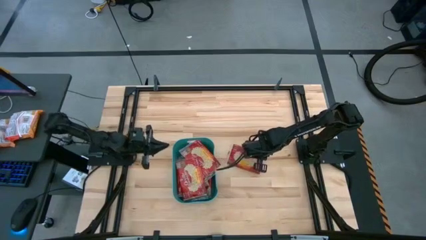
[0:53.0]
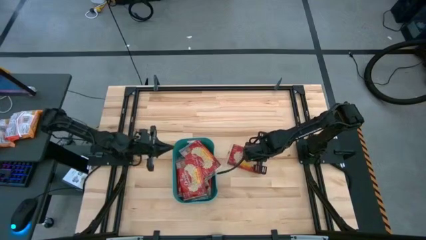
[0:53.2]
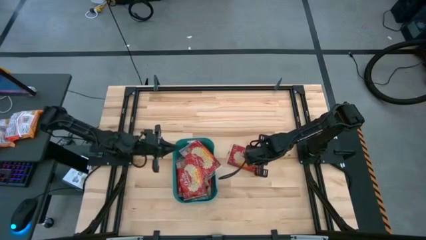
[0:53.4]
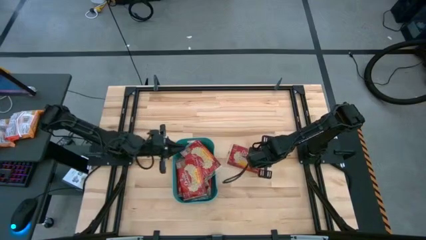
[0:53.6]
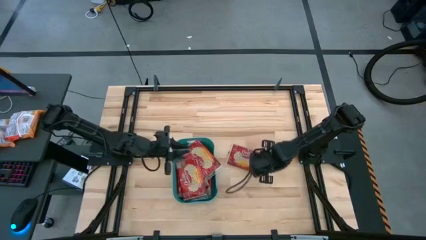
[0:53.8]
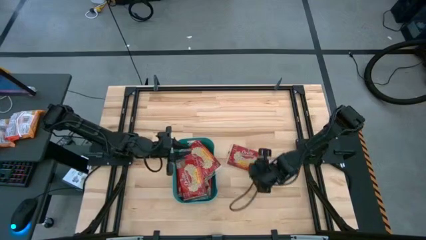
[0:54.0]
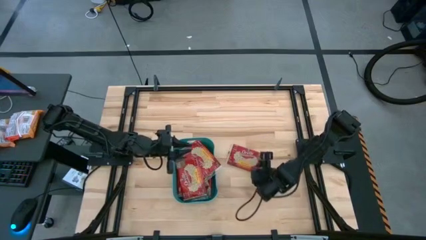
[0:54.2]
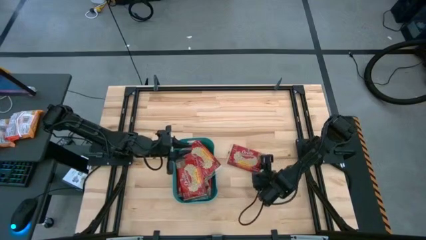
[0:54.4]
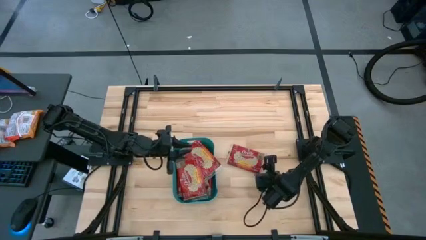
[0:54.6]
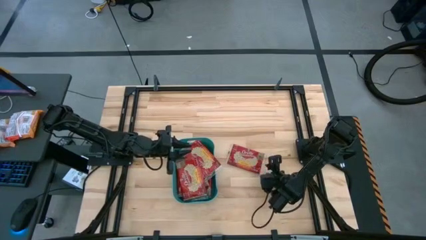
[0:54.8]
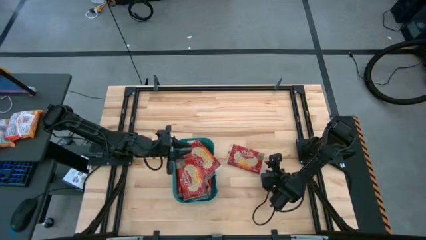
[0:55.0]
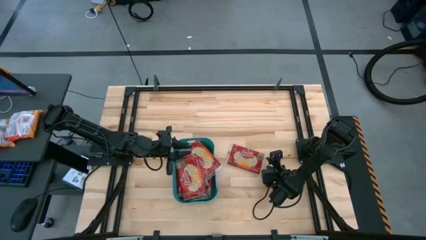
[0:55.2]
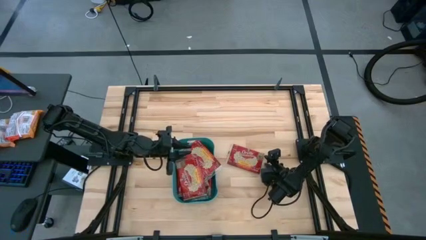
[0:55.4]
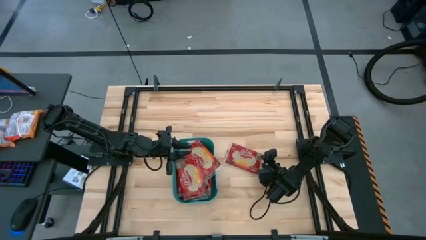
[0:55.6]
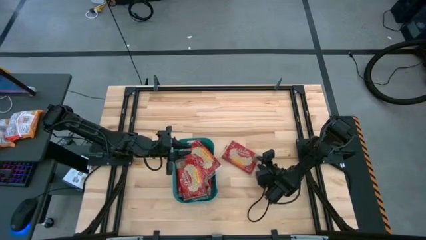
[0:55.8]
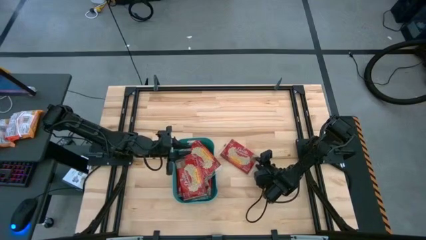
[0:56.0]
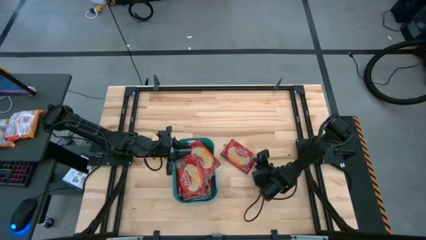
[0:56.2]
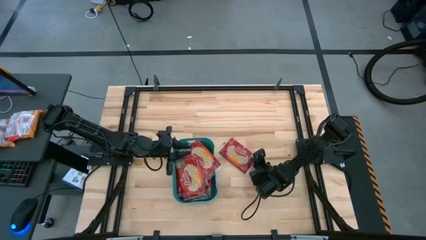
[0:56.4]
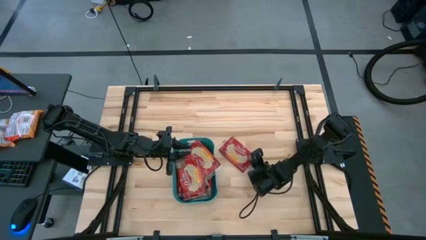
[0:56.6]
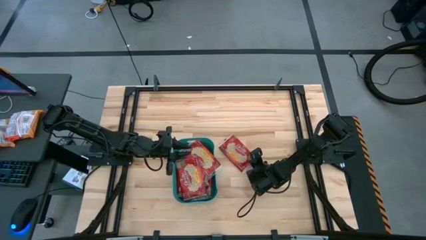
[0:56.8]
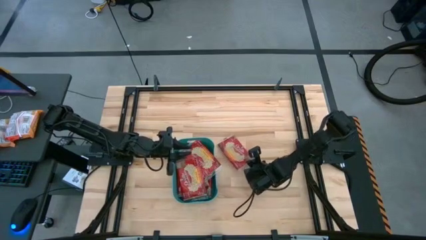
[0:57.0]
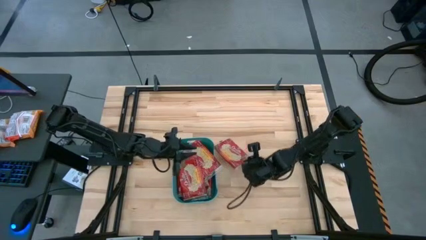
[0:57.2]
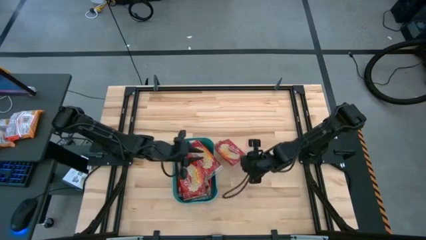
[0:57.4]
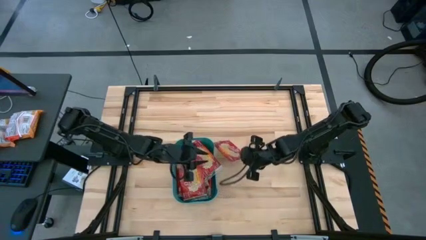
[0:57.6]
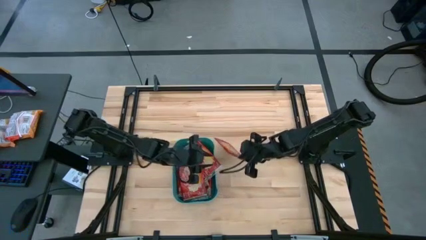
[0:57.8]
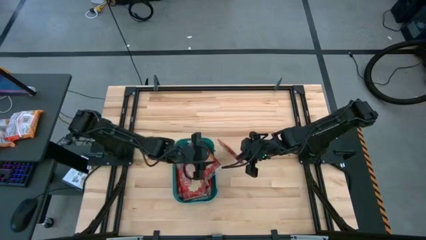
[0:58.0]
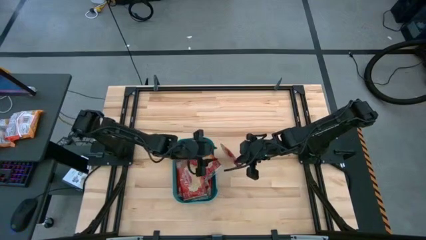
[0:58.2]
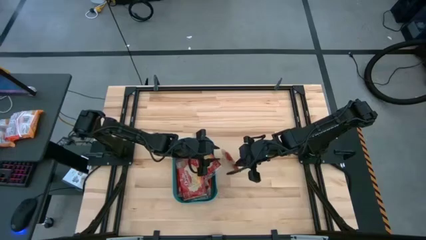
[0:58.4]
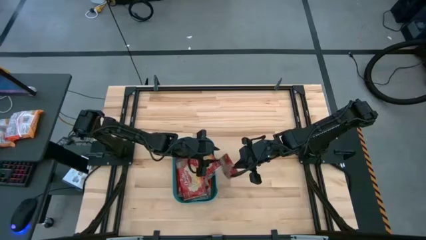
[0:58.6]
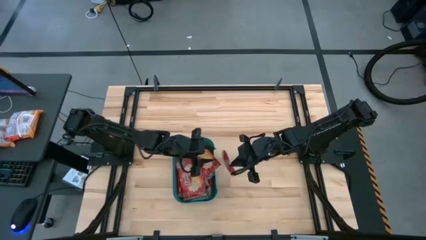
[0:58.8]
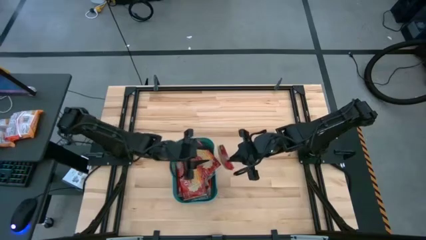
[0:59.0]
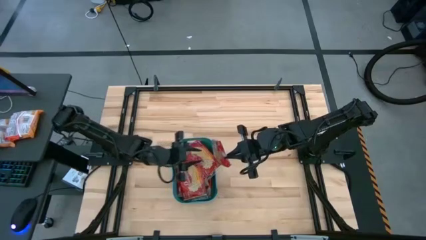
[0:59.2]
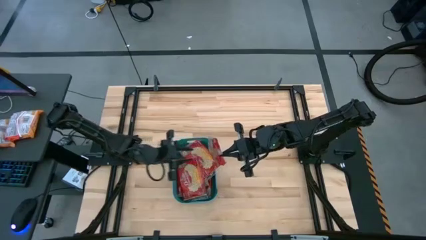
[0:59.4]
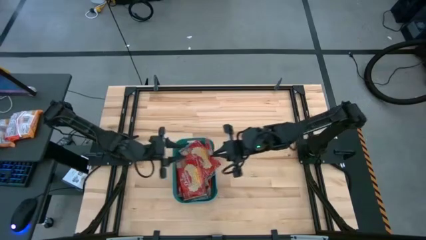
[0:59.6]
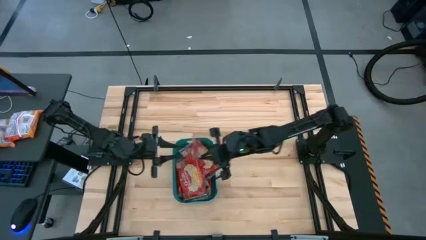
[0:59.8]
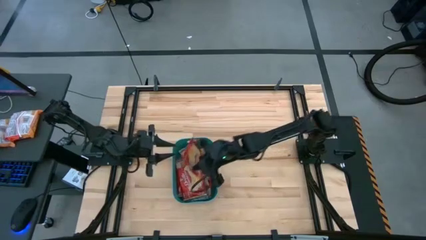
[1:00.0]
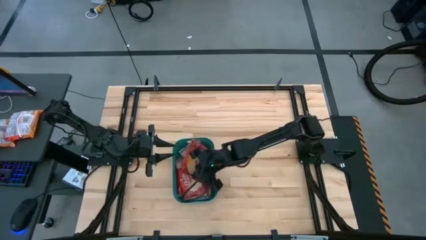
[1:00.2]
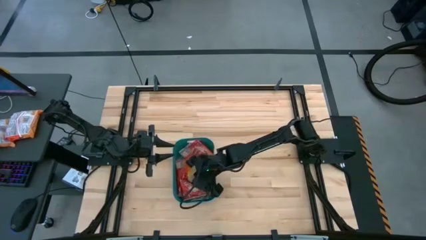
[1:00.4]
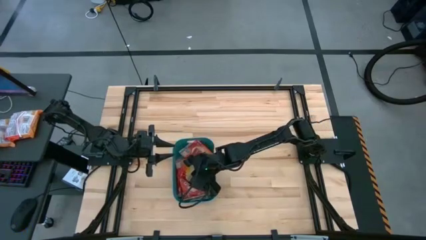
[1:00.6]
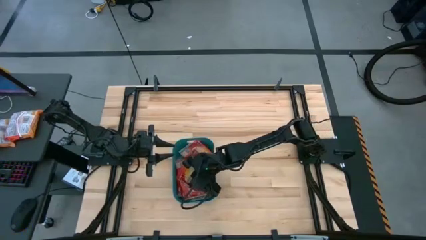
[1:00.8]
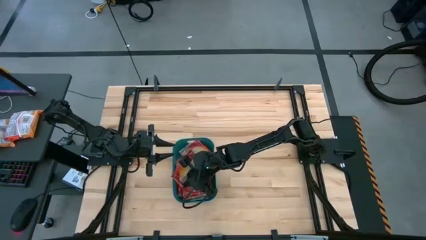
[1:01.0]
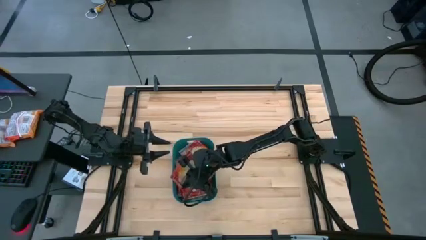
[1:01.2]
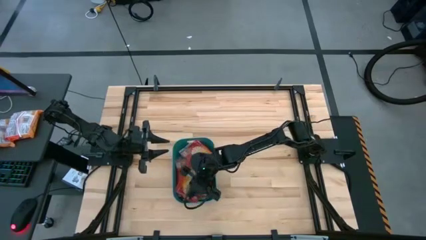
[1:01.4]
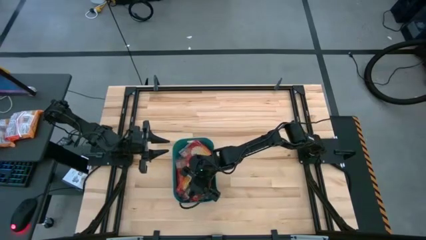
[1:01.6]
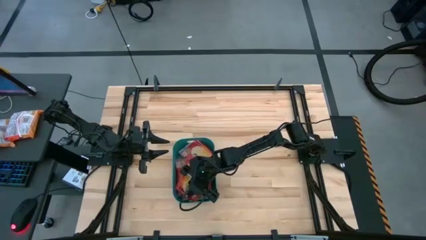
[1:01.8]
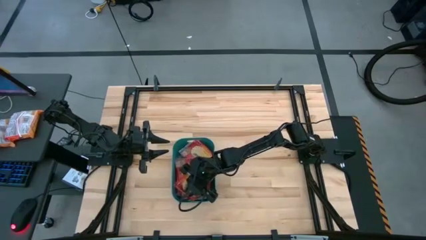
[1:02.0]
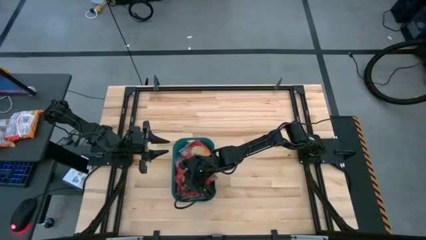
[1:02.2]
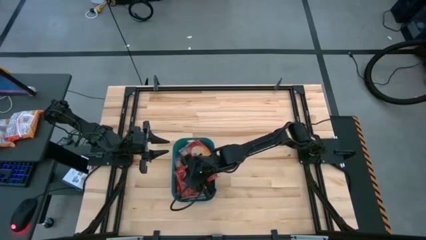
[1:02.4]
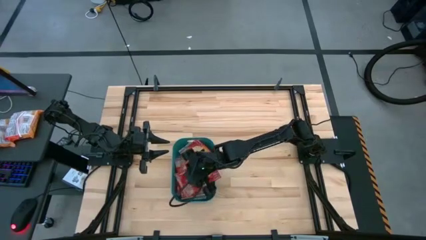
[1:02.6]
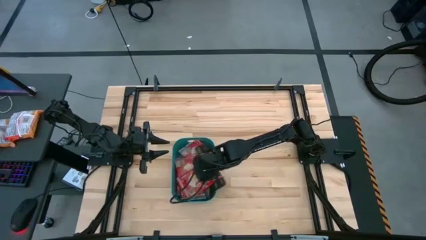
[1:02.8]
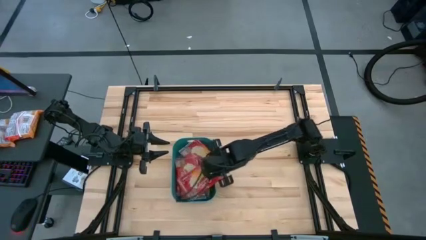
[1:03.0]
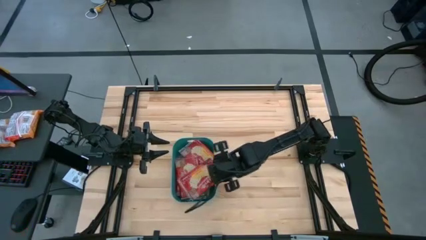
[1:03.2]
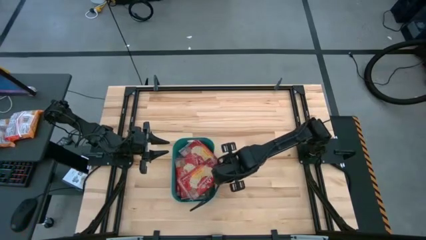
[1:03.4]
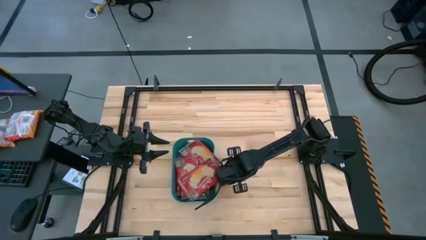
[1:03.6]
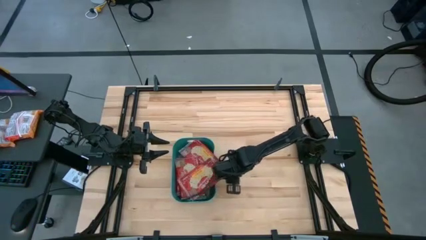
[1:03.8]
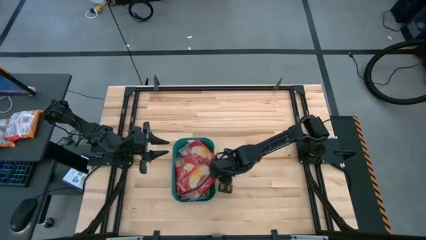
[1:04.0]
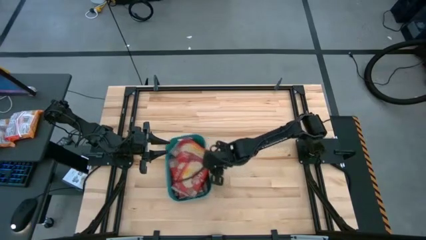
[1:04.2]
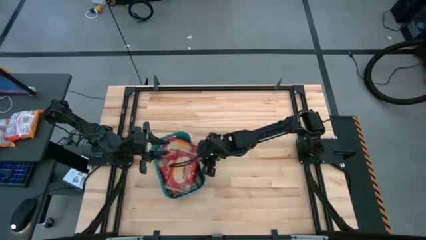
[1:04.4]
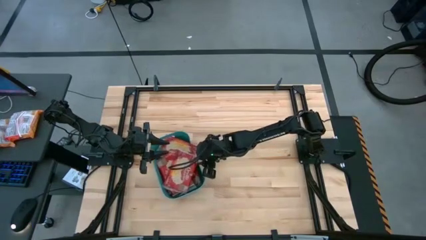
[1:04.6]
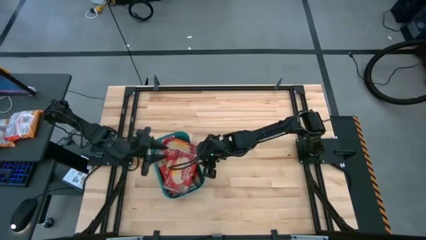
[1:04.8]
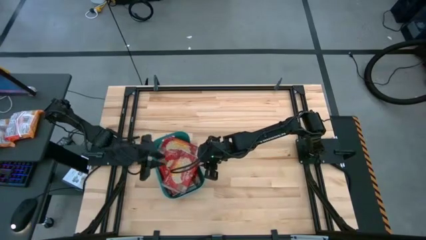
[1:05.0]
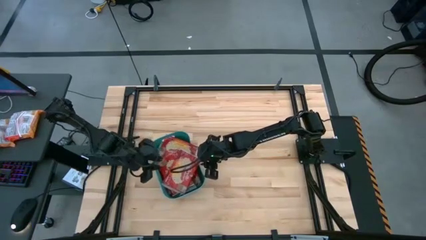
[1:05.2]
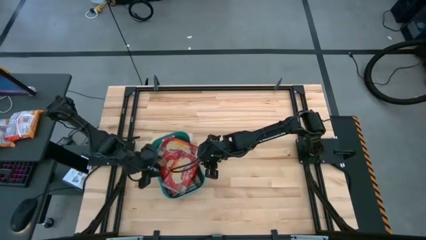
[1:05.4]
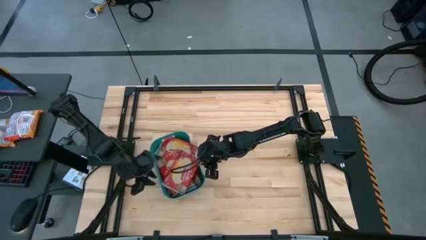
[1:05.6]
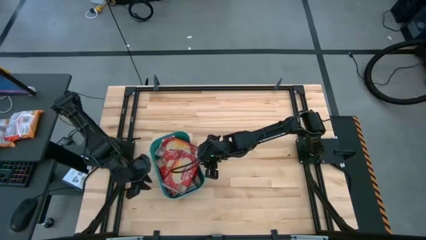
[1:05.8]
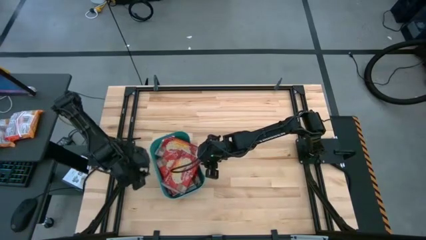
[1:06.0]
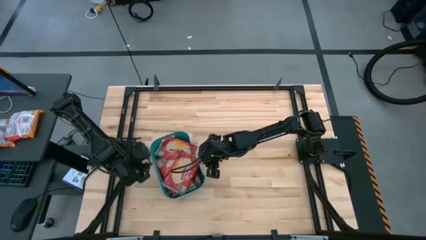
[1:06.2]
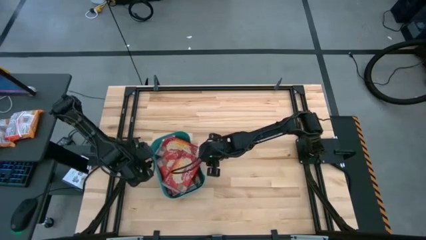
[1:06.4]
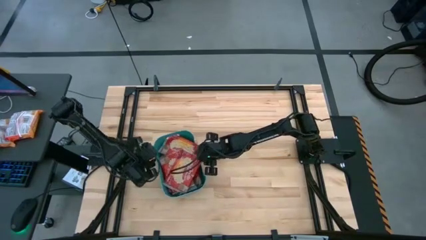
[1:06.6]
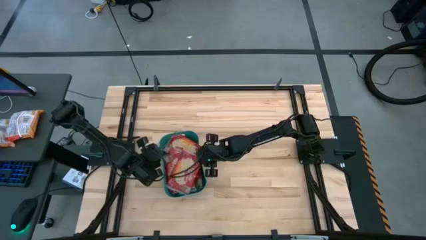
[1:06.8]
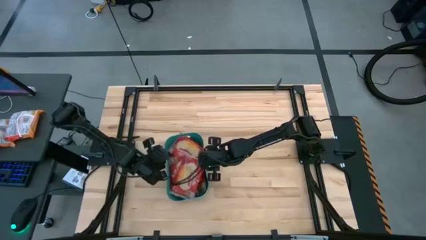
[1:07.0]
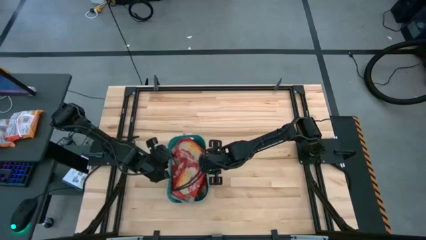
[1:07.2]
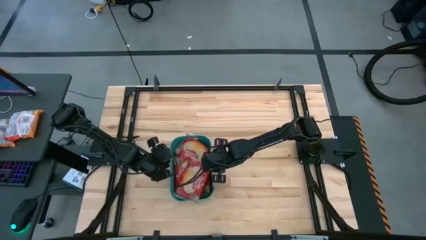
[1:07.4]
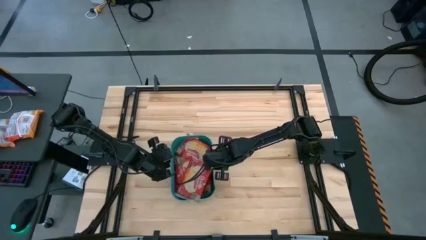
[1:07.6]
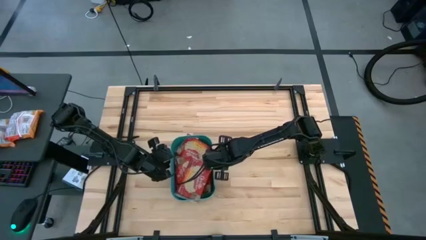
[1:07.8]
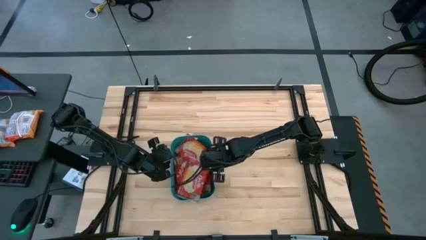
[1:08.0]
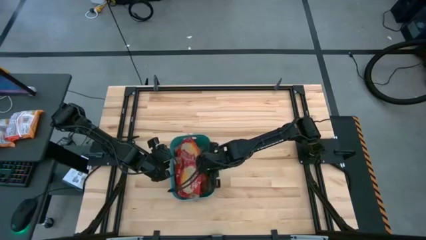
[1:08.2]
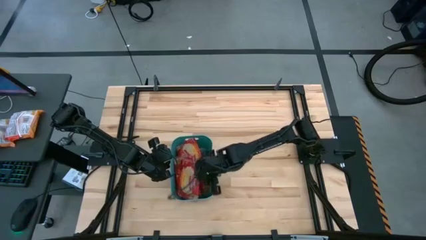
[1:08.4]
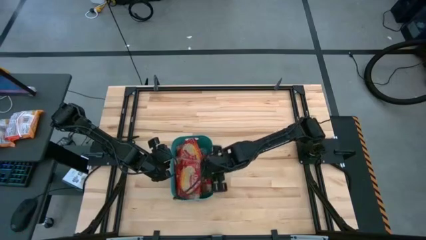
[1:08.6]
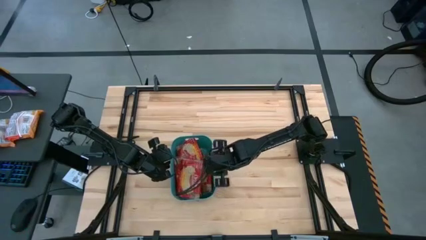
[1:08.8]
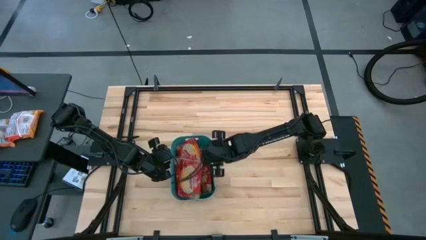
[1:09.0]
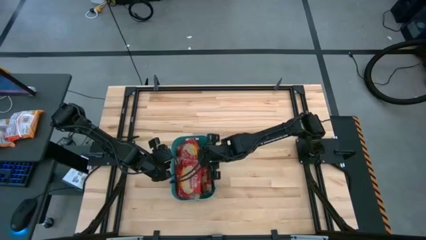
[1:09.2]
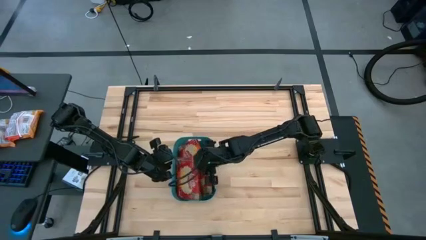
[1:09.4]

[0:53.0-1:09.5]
Task: Sort popcorn bags into baskets
Put the red popcorn bag into the green bin
